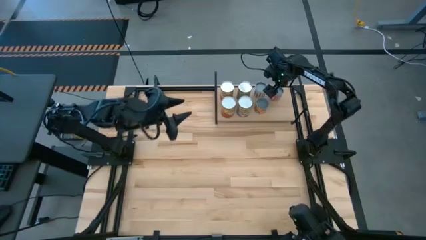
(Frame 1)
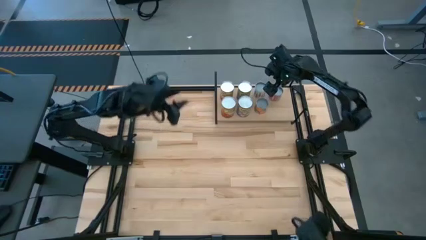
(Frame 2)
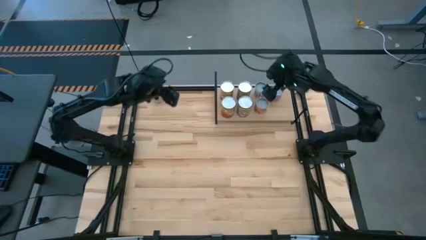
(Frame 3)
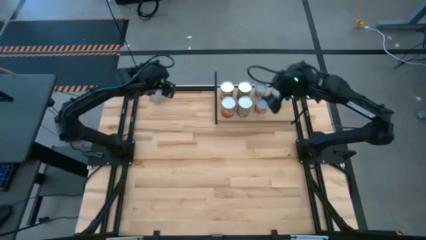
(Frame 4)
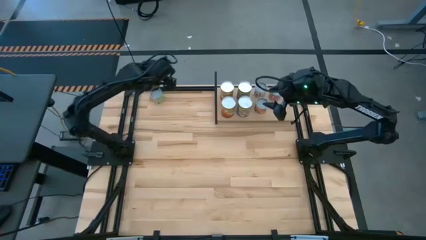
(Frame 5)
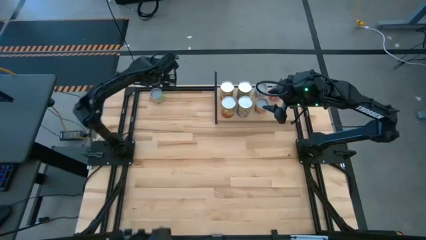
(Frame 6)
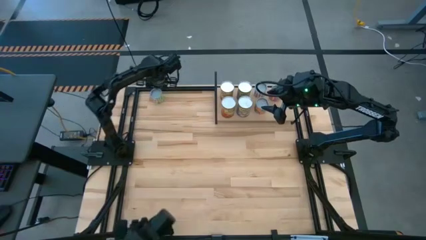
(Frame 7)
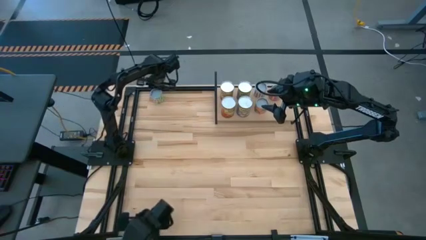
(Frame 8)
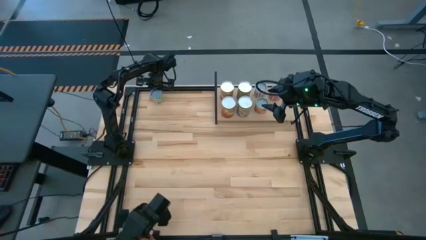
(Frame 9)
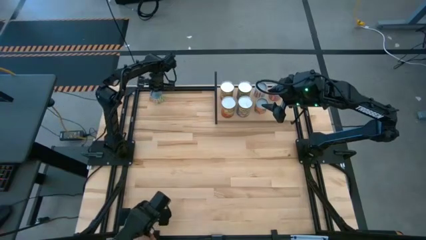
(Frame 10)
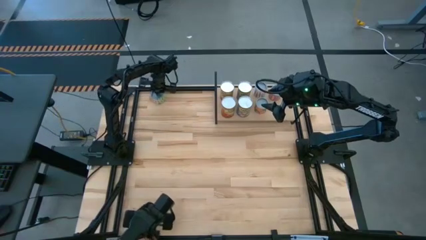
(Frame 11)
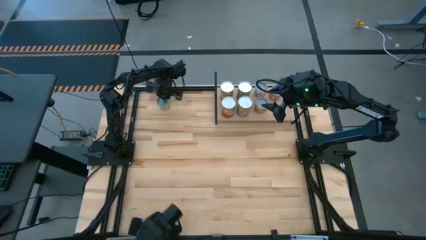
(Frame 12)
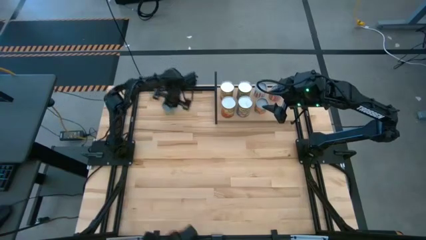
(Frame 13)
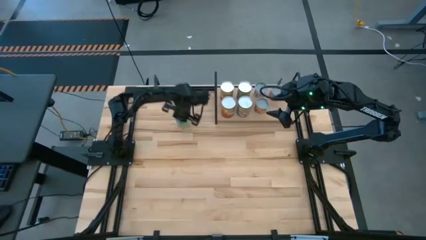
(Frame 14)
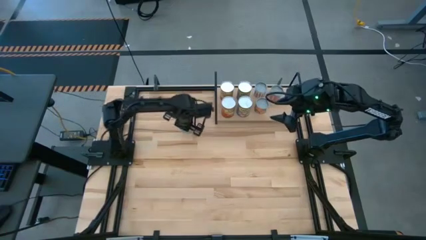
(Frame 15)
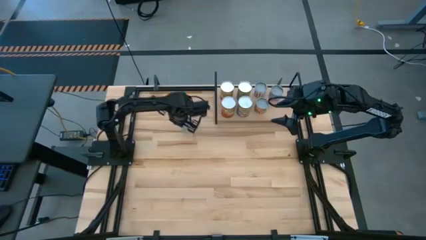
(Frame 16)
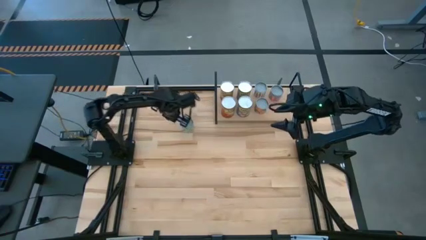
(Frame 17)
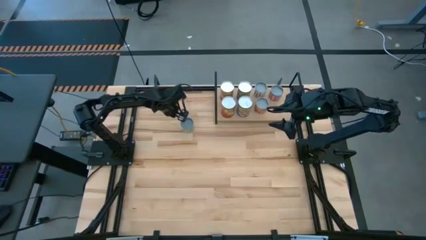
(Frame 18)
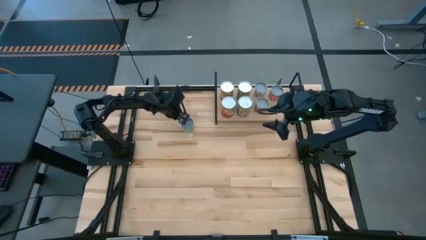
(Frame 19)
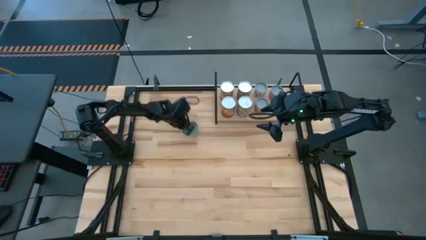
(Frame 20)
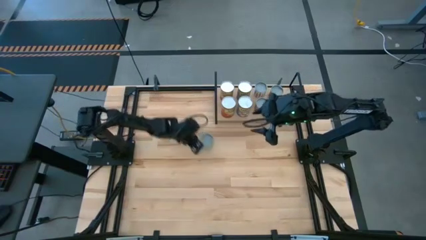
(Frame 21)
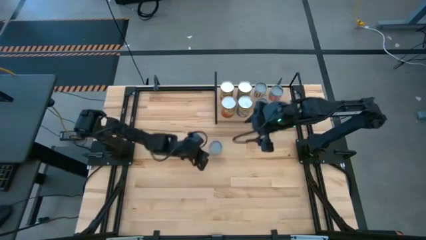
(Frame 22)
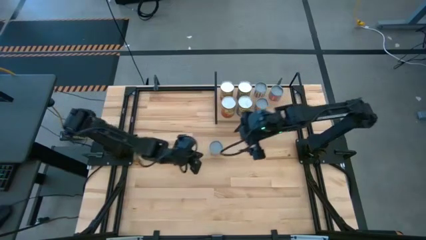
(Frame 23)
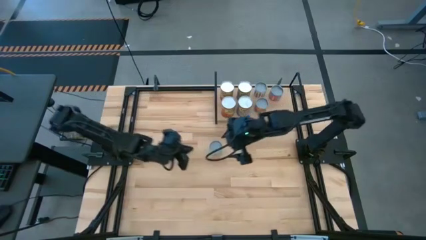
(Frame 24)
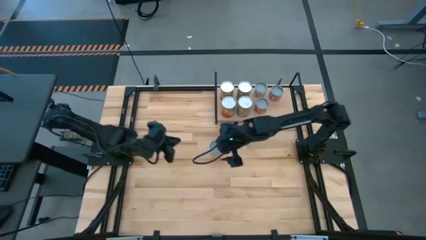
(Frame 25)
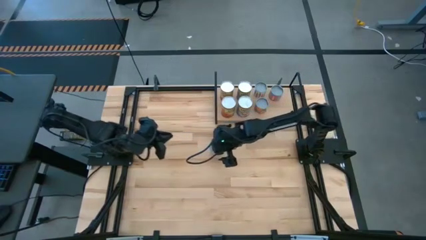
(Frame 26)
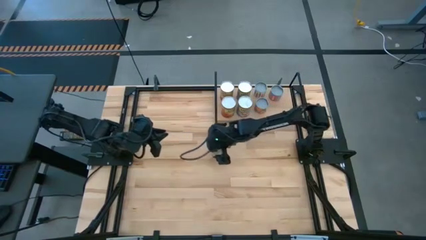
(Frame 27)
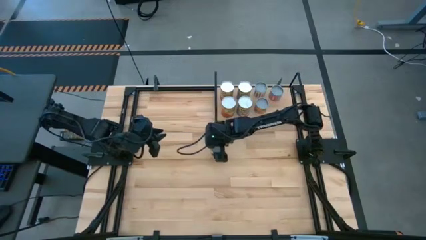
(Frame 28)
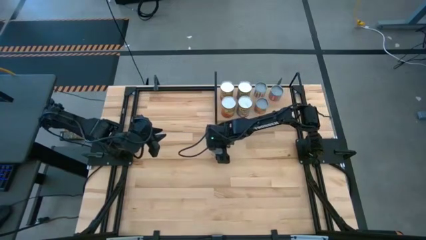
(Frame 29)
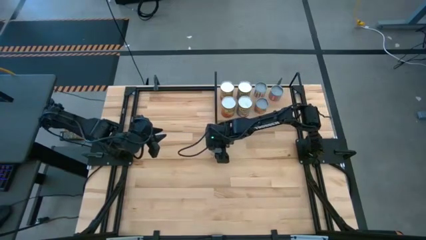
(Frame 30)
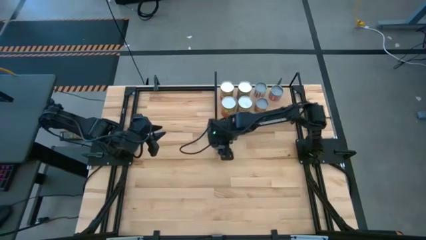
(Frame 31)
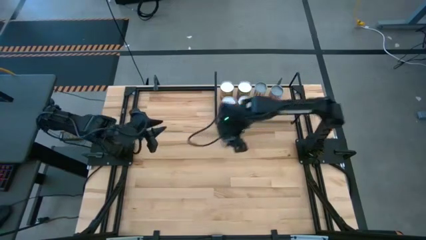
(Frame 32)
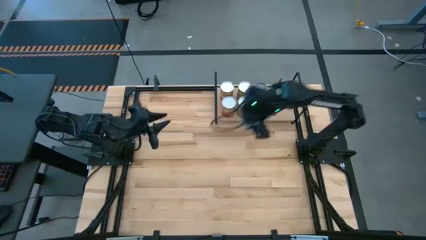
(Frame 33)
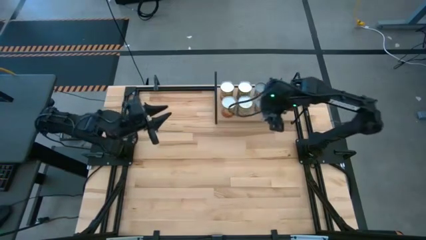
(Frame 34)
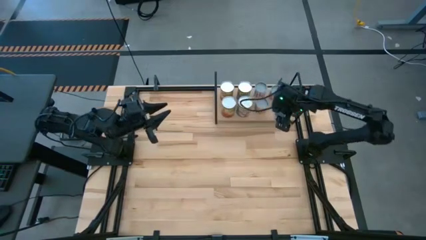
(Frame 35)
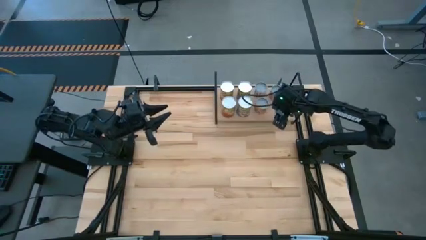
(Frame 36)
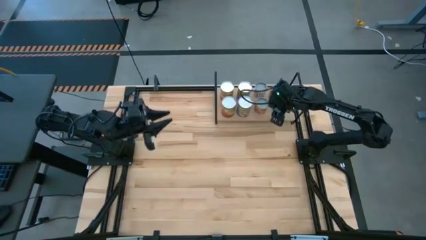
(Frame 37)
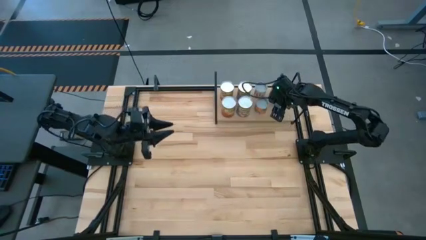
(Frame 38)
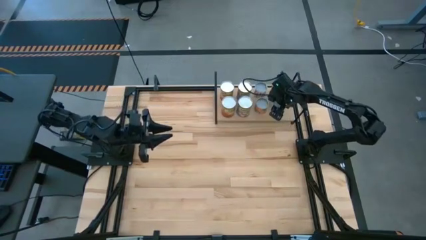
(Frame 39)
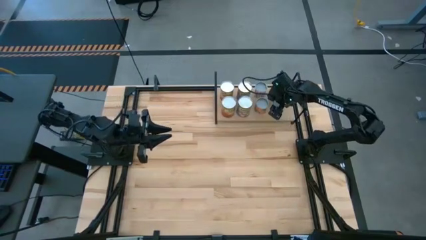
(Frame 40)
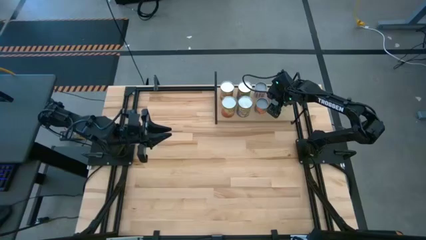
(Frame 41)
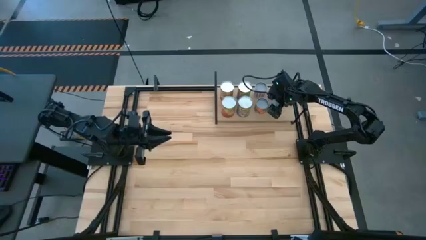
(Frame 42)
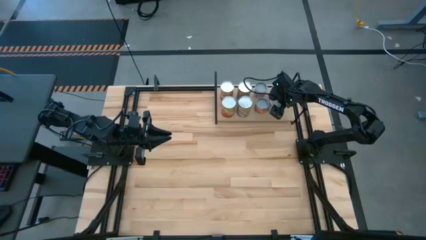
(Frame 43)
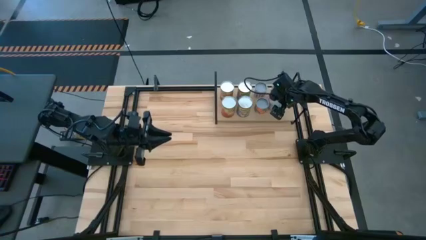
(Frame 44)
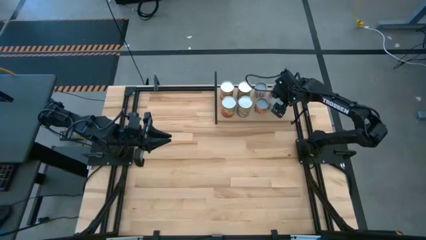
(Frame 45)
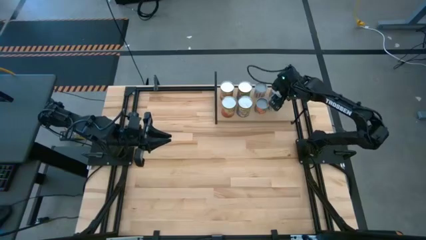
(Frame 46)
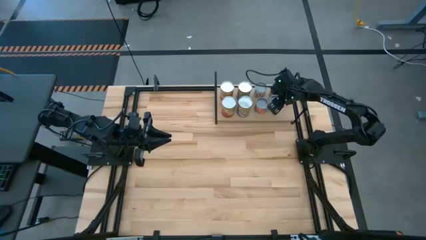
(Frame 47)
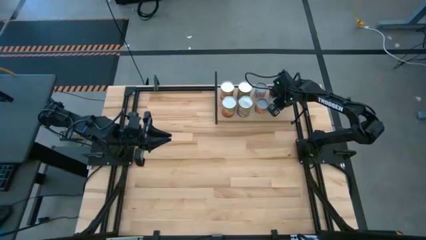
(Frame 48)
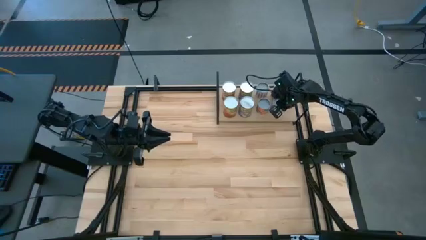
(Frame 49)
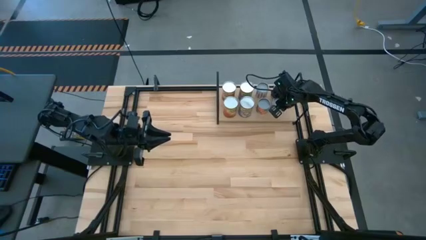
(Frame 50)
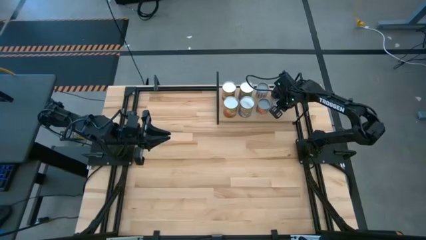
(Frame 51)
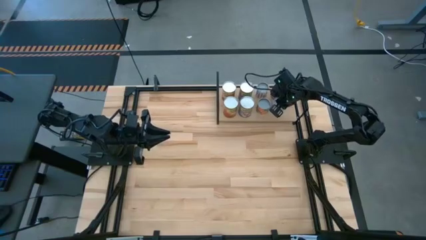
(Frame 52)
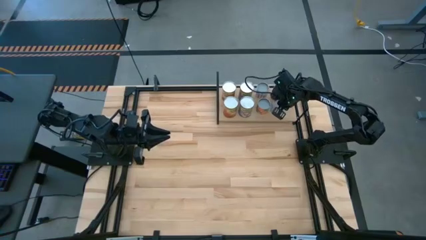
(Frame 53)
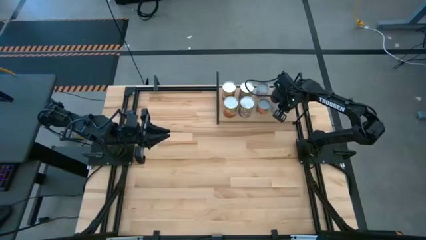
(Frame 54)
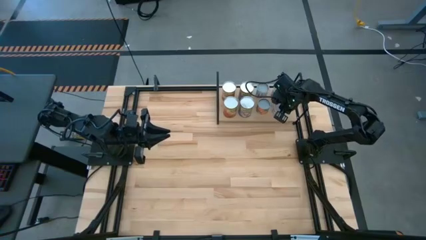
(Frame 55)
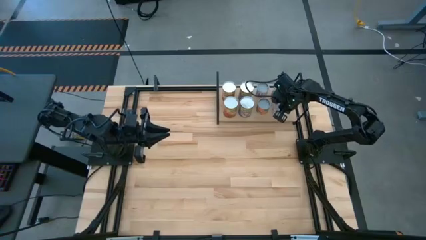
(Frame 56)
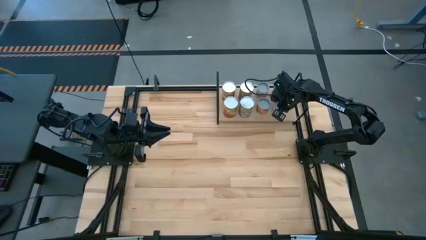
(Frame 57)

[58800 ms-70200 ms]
Task: Pick and place cans onto a shelf
Put the canned green peas on the shelf

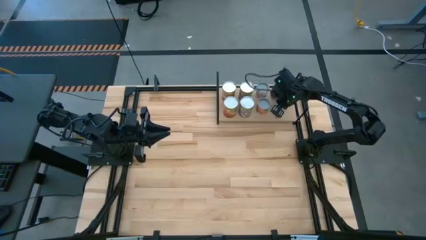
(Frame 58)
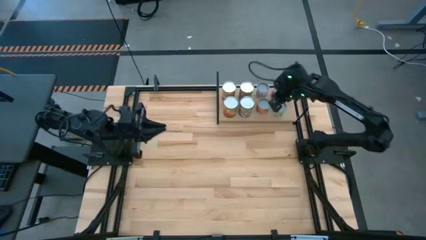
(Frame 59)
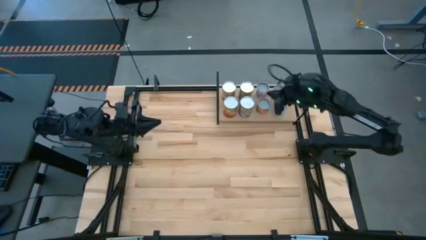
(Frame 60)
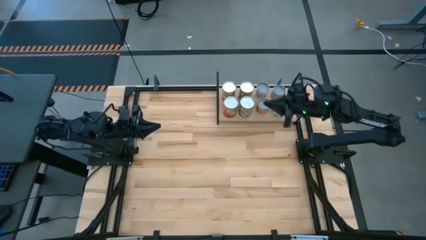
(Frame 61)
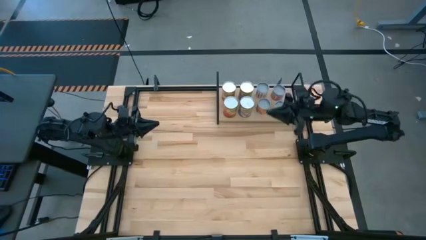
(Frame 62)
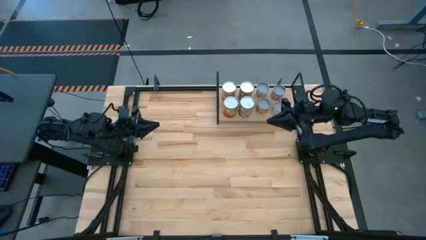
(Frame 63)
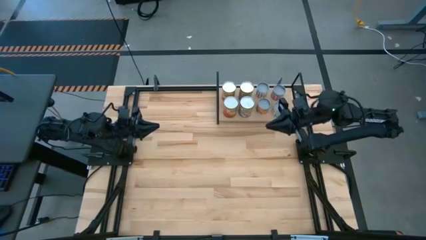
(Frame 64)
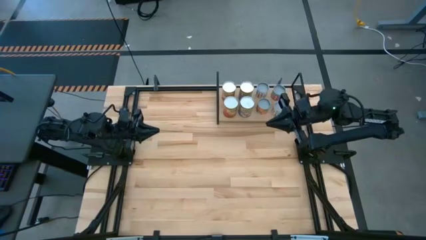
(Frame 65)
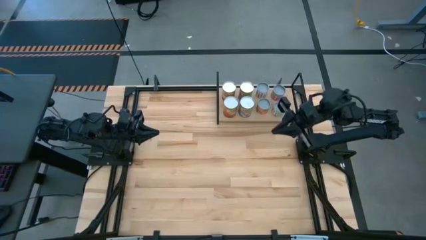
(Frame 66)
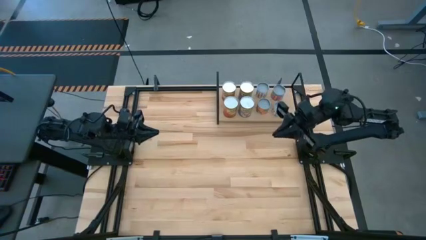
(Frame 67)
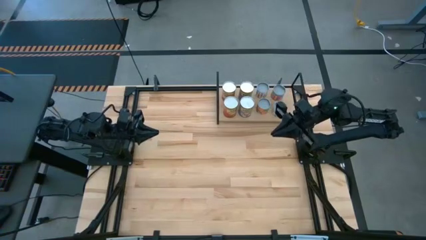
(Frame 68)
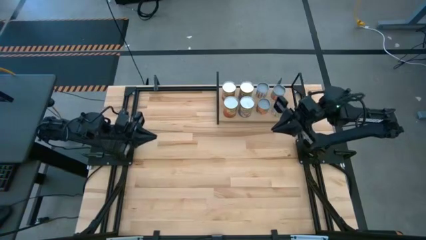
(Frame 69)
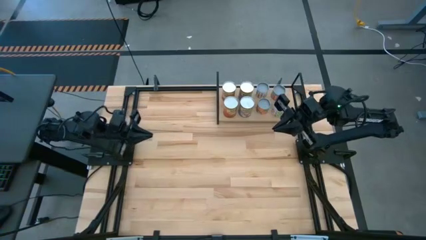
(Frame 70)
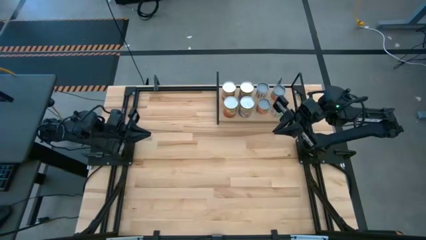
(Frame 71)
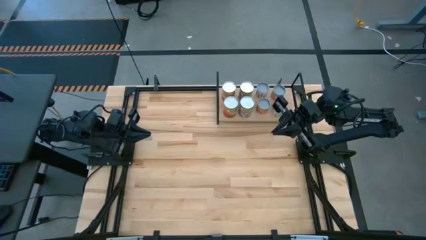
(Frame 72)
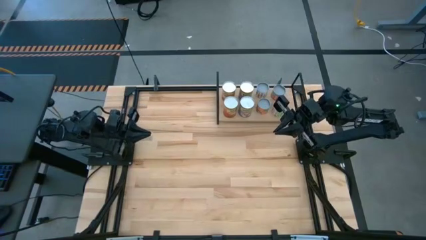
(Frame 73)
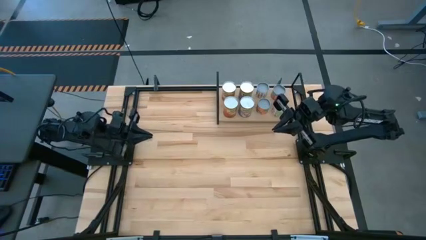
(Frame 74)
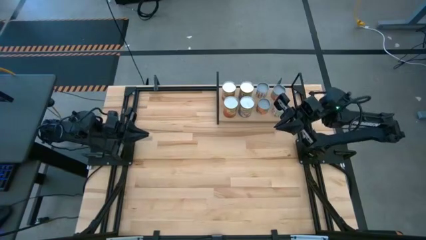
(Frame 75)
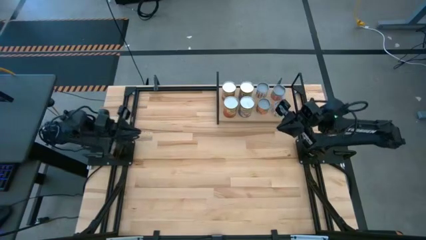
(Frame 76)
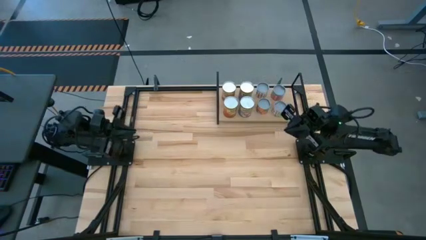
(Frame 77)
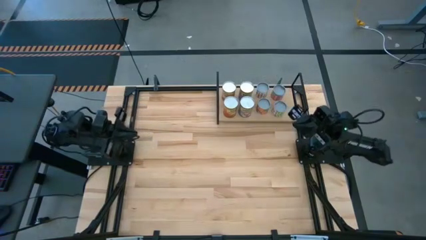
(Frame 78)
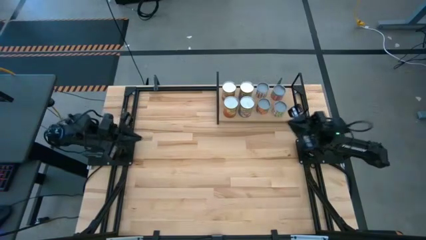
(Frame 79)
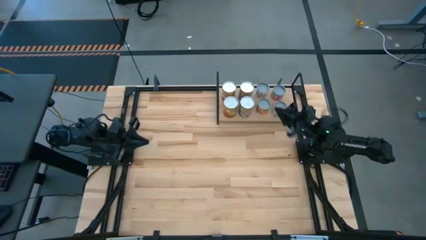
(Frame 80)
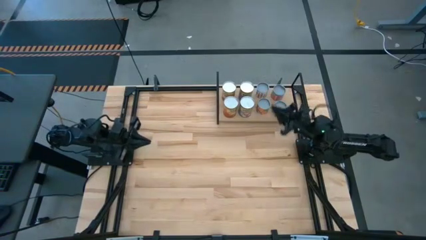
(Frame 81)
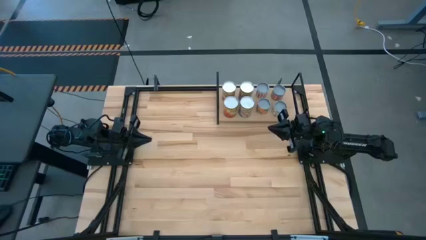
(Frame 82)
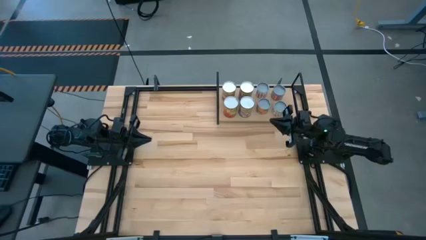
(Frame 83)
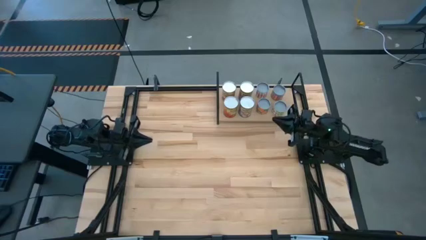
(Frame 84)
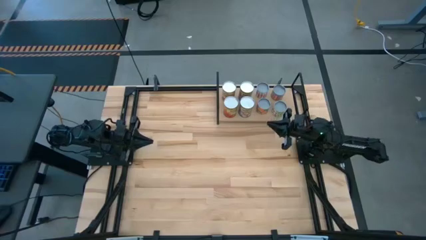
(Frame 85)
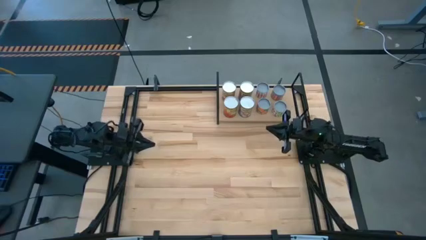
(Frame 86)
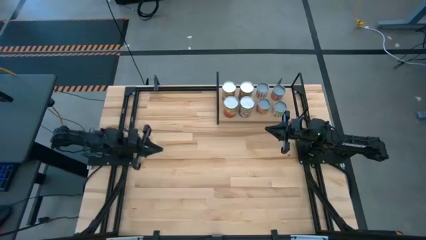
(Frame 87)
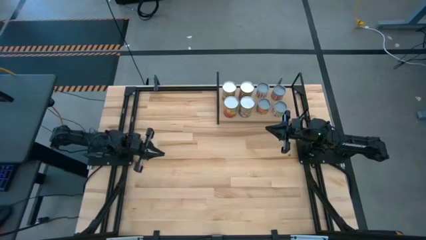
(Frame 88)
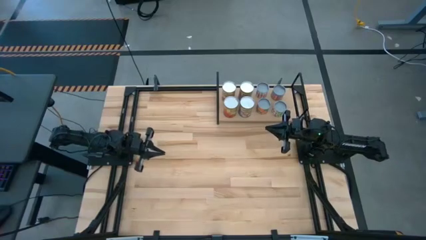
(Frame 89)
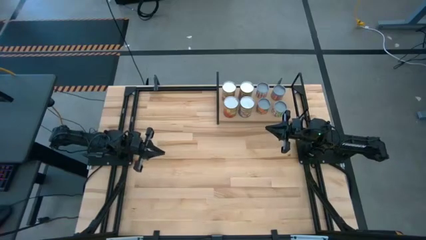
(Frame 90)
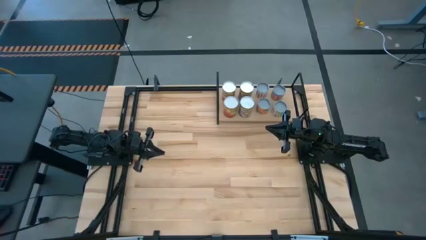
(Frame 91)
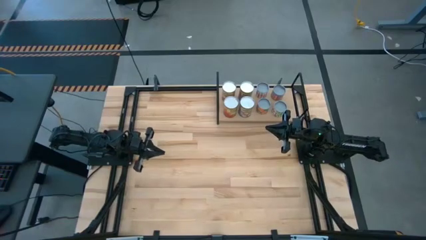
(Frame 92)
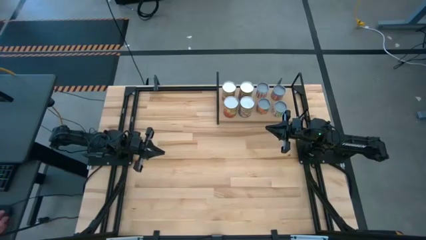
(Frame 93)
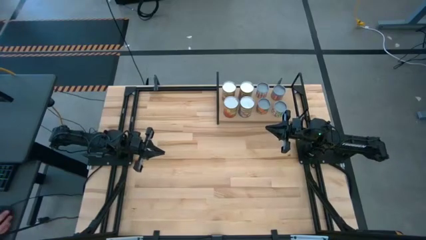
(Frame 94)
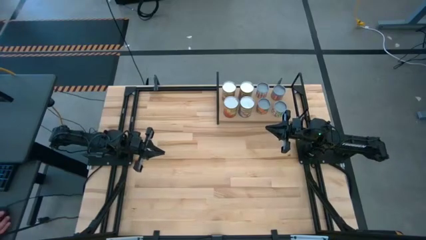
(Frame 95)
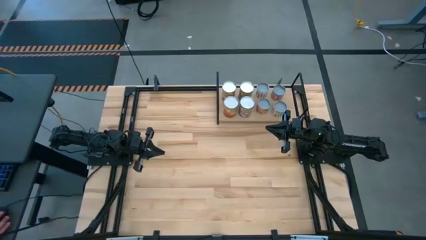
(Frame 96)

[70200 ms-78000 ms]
Return to Home Position
